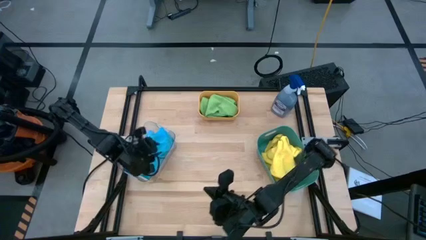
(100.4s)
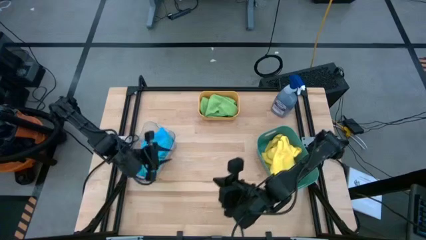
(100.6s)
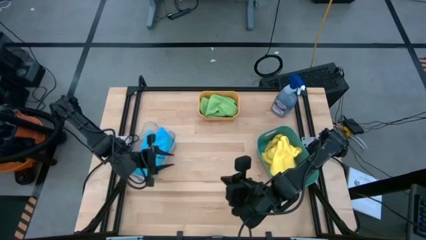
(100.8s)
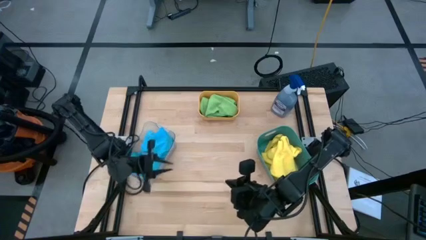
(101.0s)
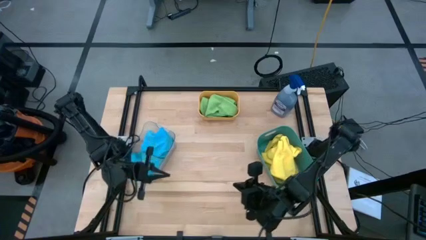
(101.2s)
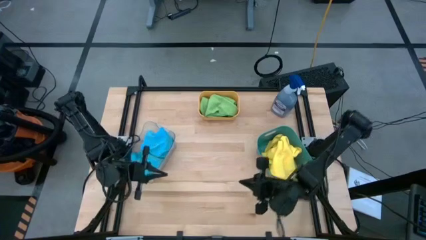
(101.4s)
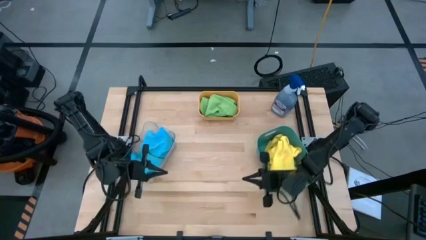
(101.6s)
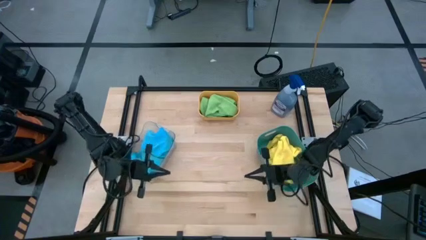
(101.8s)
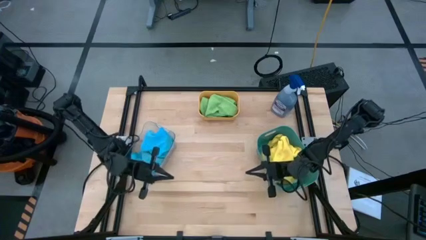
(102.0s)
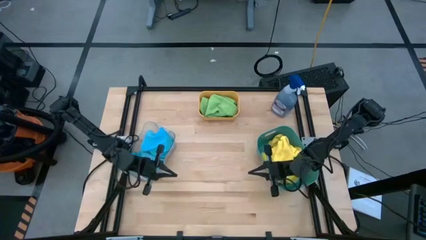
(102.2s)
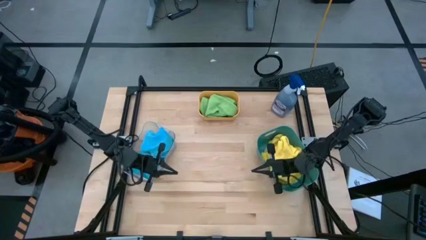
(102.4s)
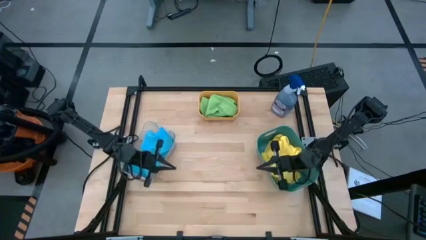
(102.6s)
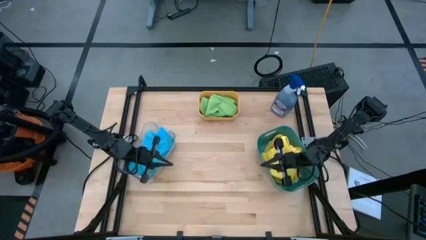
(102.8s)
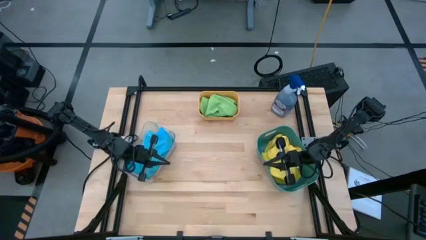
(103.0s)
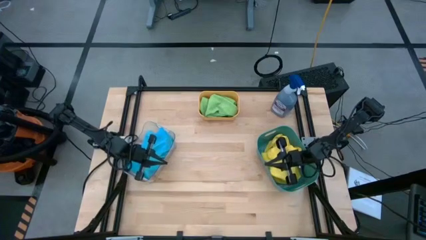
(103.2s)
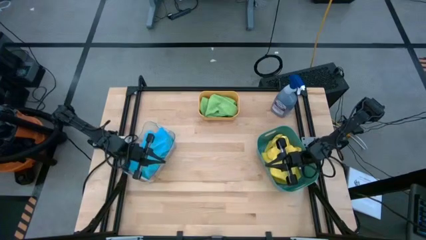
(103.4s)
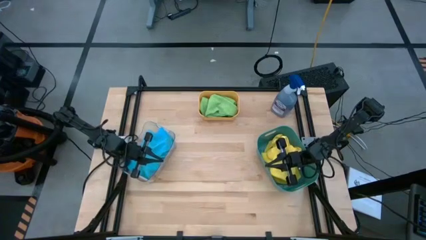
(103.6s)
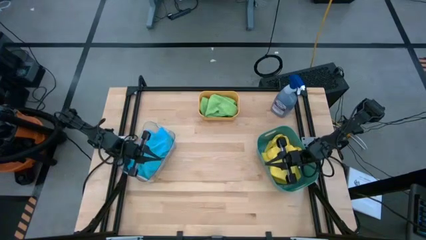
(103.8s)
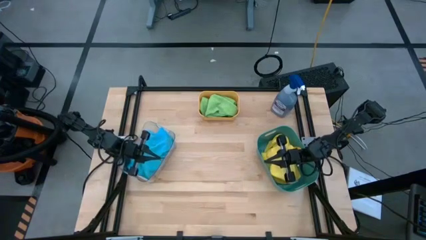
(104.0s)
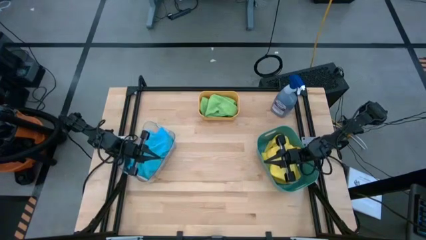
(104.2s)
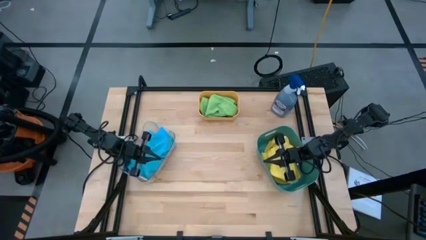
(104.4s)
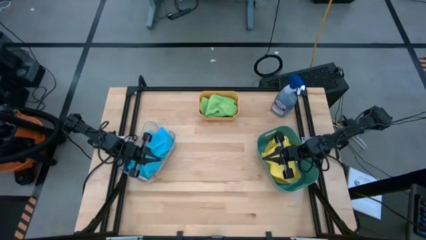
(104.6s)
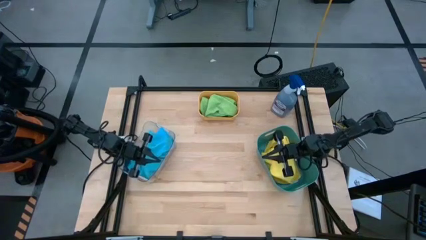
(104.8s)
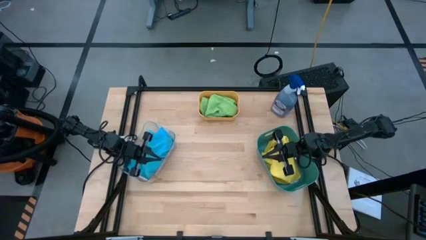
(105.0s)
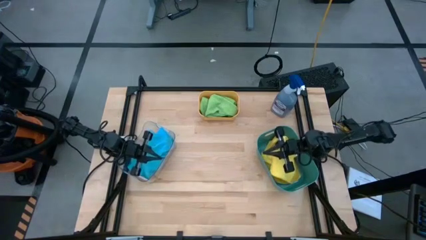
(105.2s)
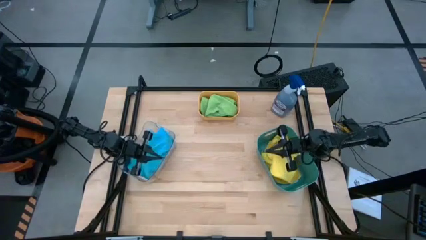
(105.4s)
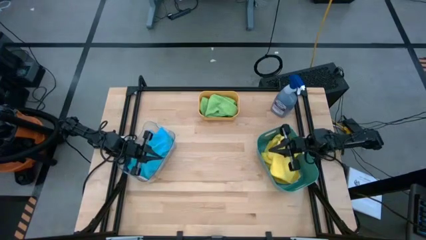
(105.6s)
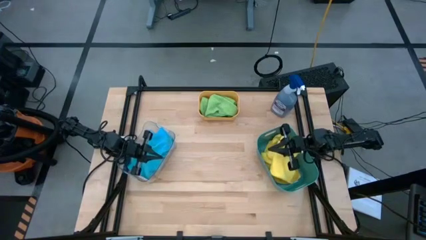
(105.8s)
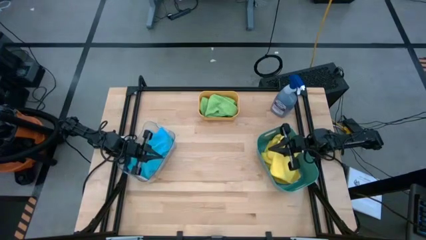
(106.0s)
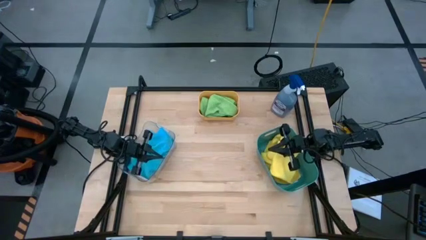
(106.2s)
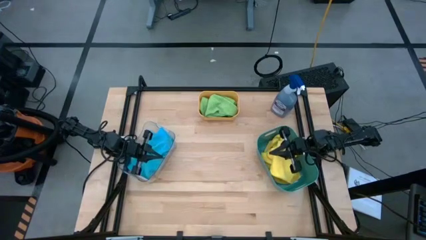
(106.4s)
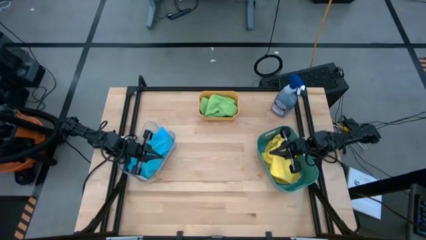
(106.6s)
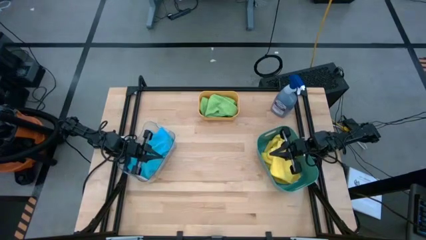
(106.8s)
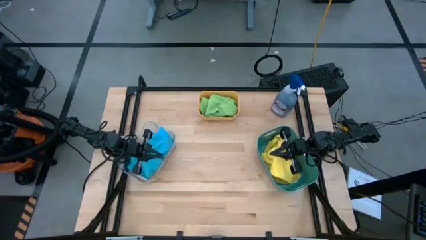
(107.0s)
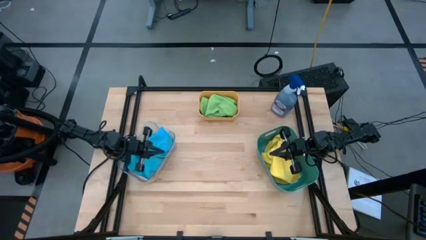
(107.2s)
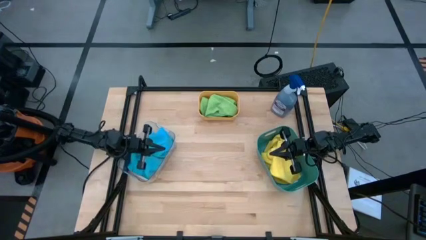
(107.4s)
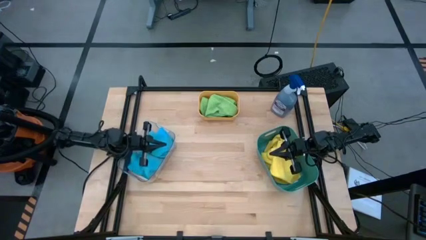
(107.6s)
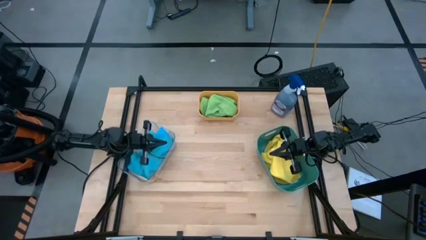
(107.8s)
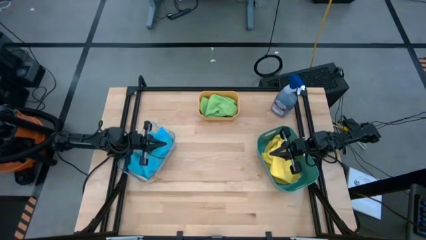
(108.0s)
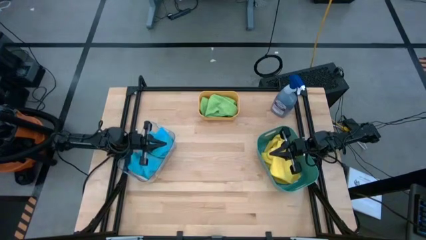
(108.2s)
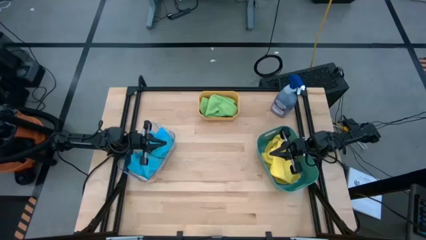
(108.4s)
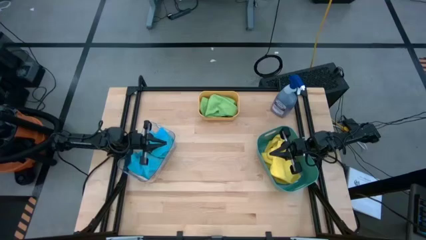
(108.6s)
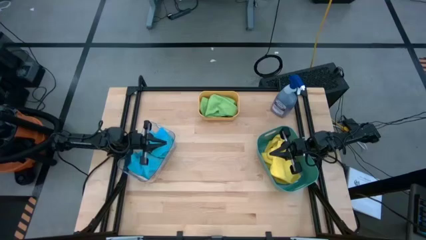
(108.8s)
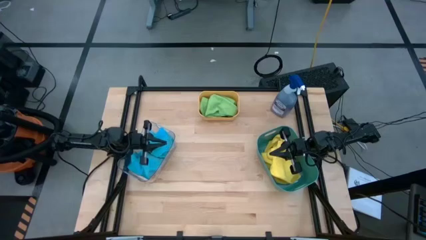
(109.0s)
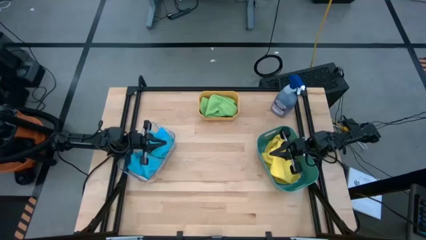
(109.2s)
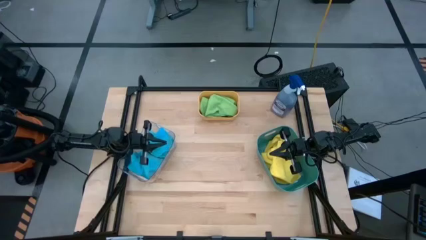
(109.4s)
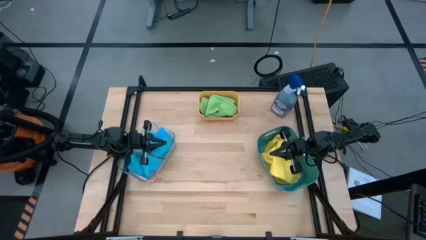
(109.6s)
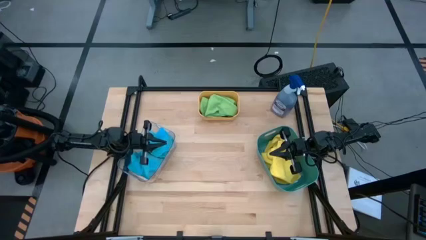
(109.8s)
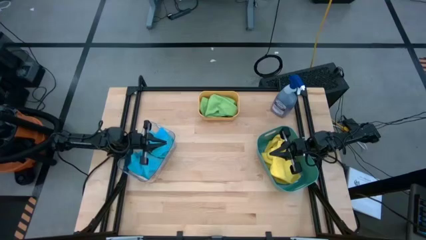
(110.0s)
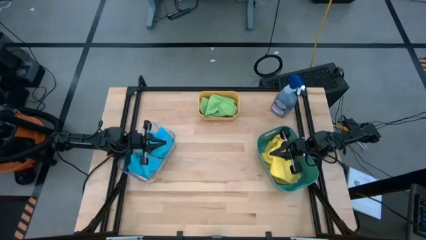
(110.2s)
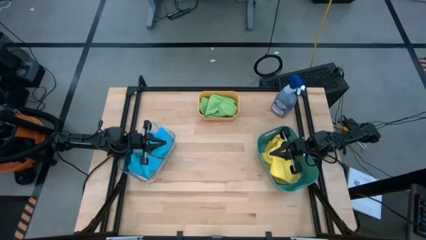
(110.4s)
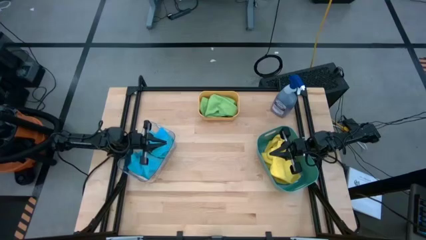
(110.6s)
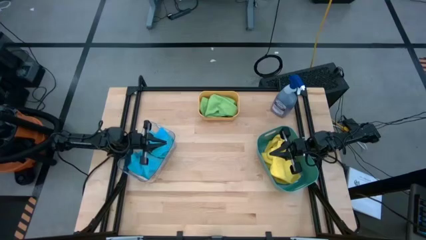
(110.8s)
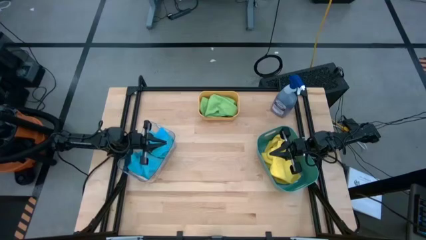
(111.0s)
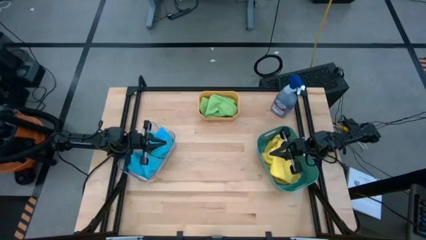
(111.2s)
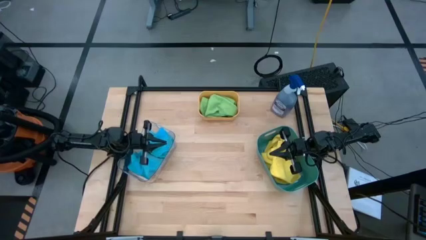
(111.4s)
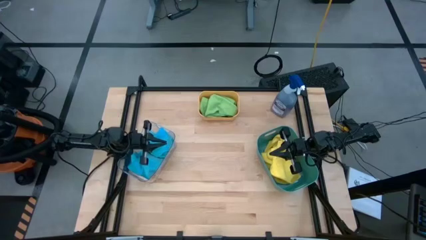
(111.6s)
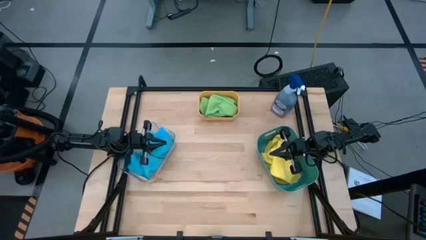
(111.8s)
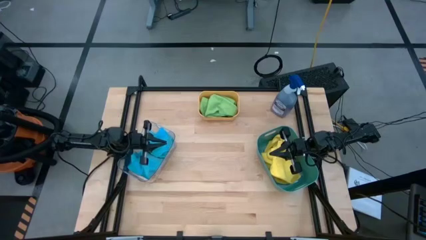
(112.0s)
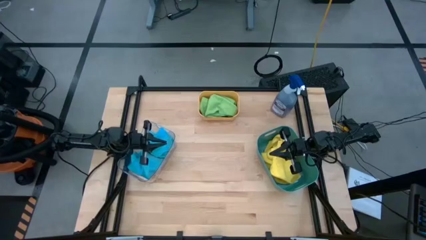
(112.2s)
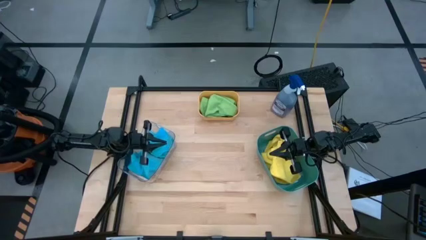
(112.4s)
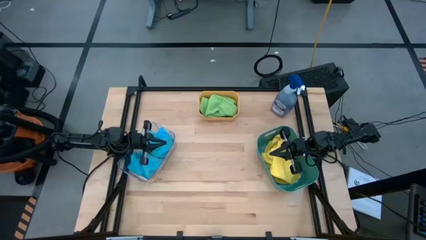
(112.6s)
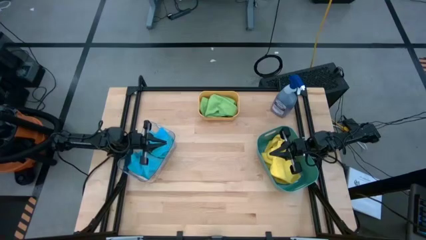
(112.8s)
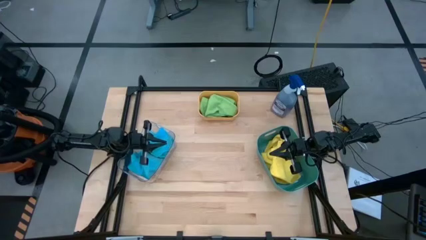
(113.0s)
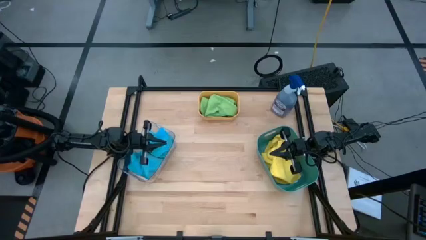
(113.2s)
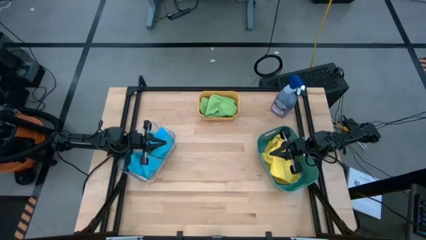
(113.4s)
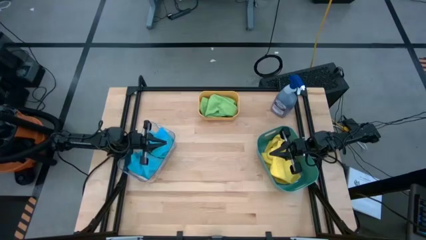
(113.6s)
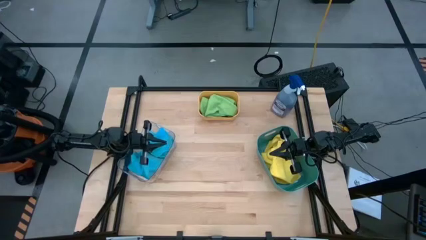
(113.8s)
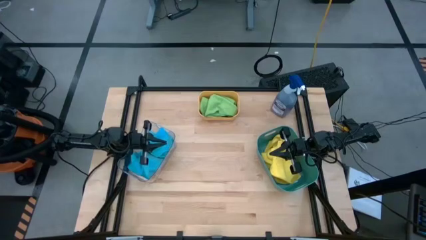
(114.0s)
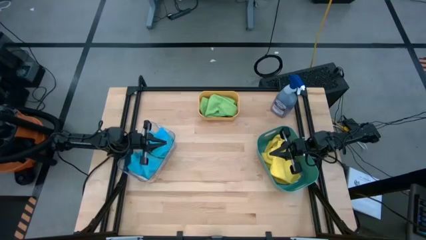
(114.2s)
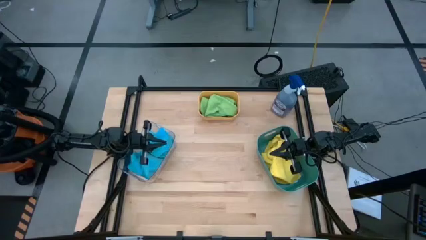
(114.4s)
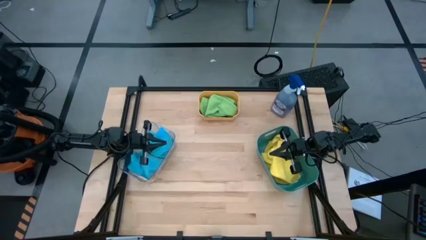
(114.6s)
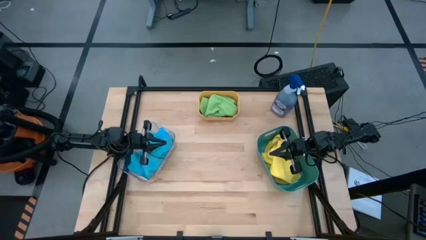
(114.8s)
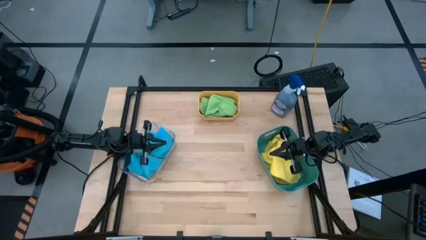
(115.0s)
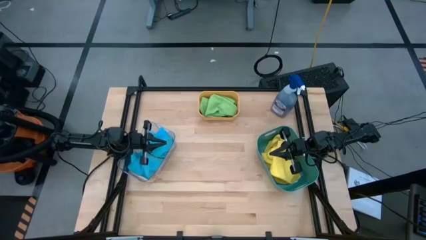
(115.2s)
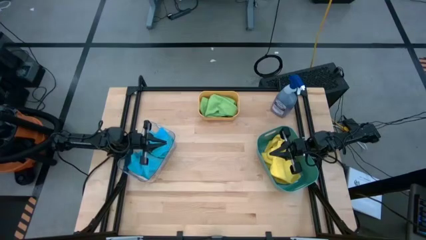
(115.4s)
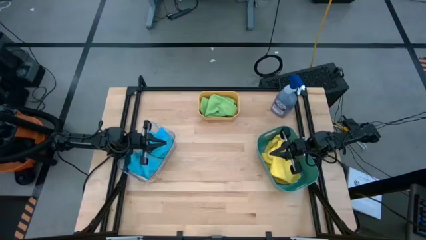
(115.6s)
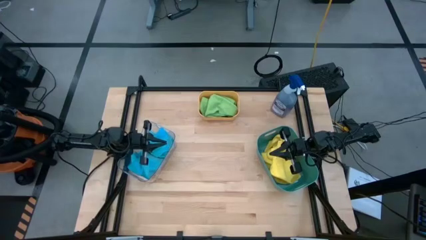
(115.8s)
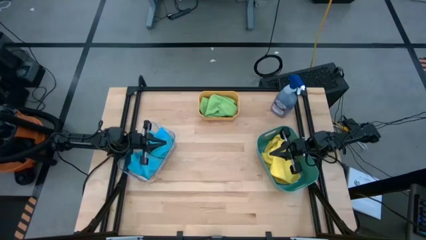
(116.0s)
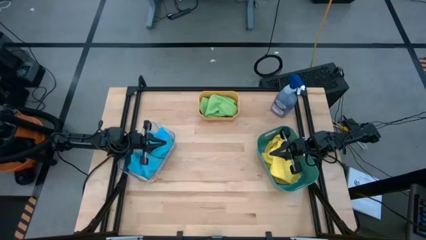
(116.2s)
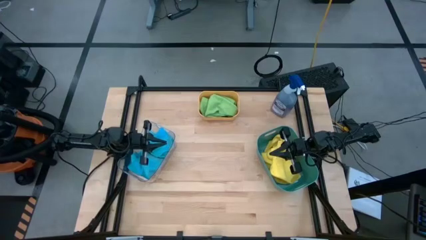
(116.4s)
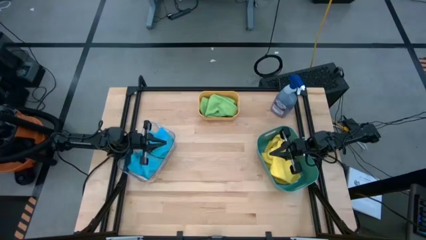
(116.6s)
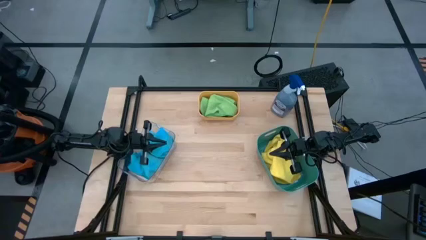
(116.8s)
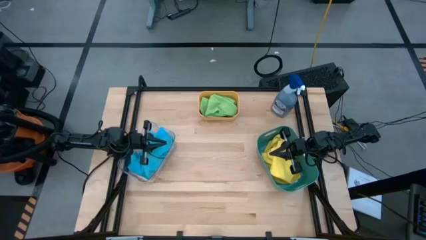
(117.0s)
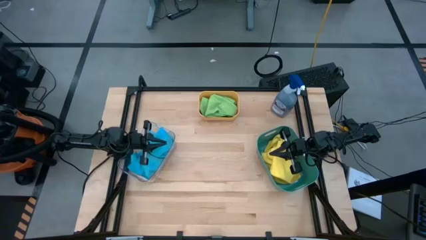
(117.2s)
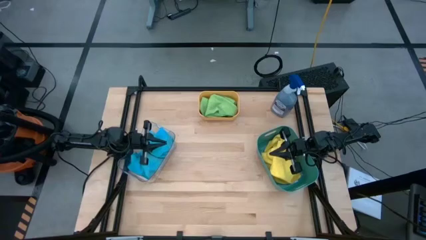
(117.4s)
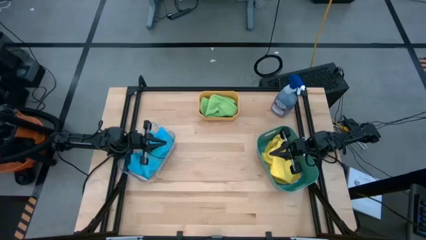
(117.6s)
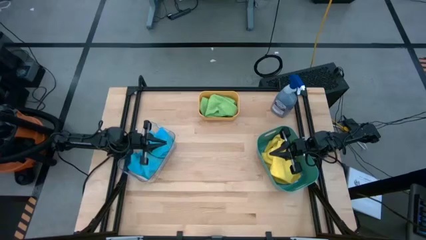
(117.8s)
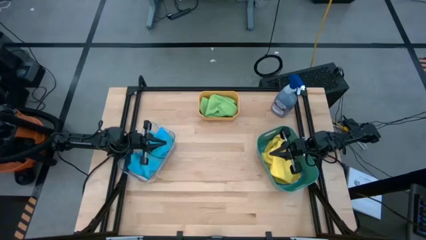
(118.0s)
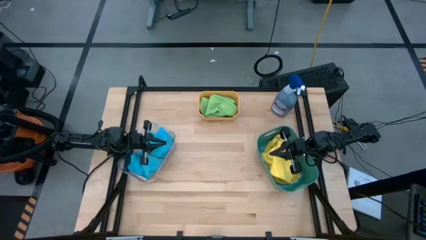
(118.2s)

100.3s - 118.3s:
Task: Sort microfiber towel by color & place in baskets
Return to Home Position
